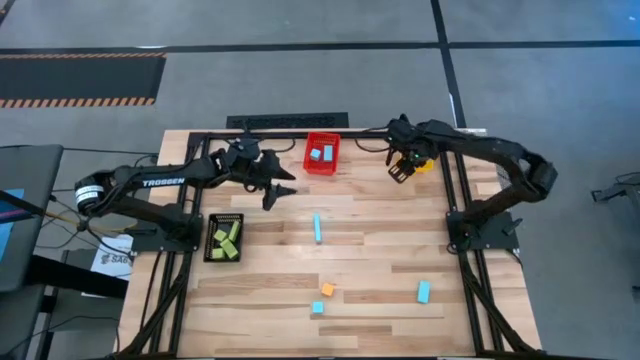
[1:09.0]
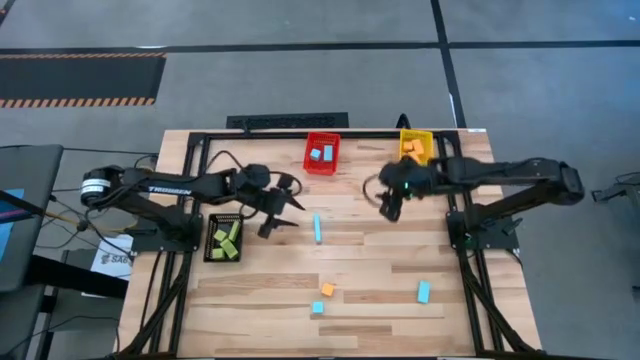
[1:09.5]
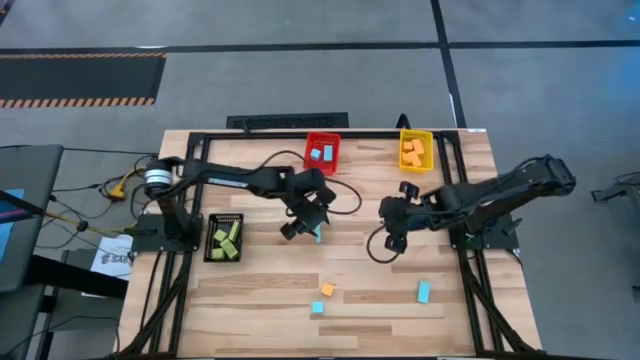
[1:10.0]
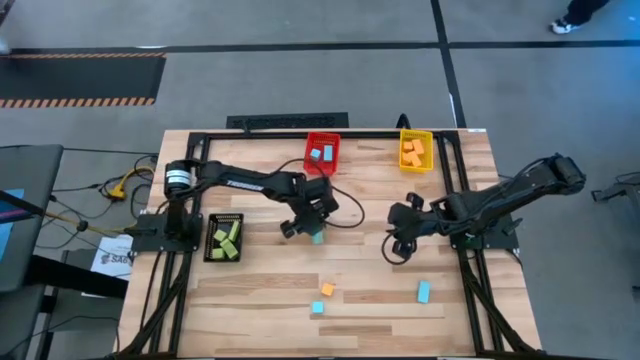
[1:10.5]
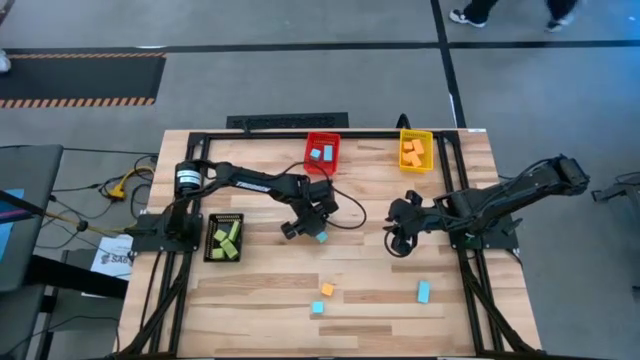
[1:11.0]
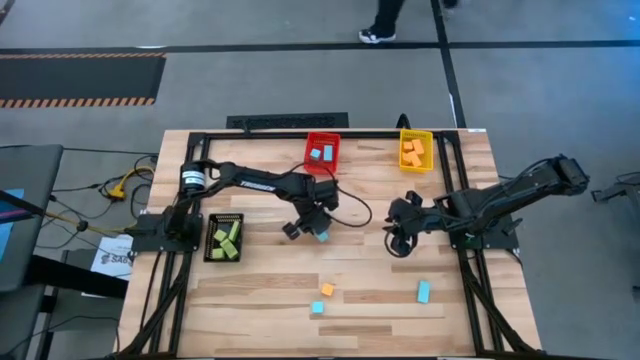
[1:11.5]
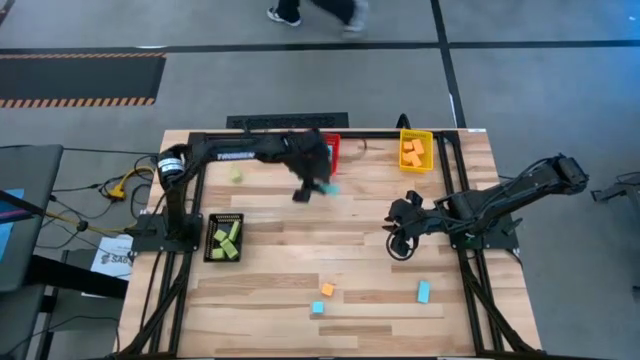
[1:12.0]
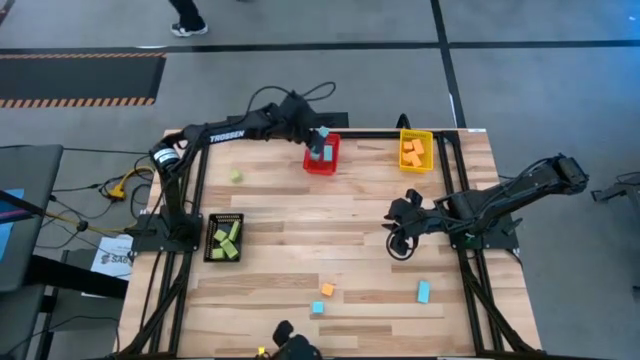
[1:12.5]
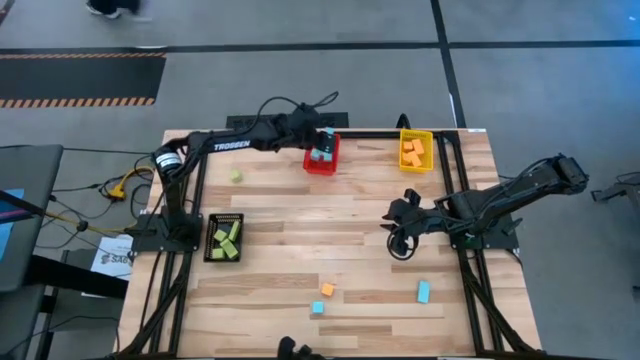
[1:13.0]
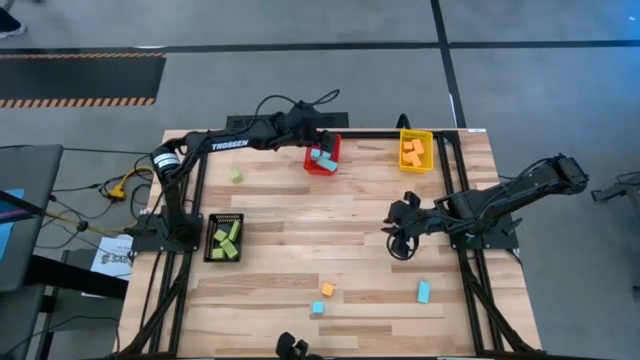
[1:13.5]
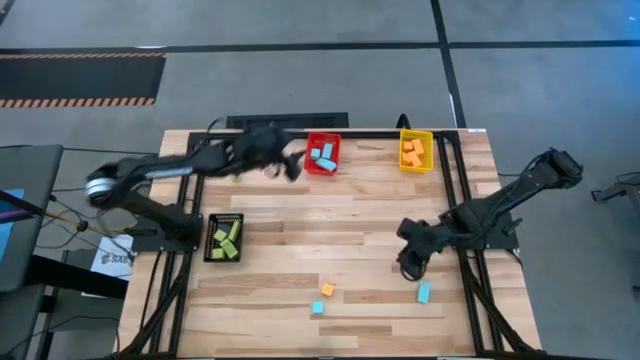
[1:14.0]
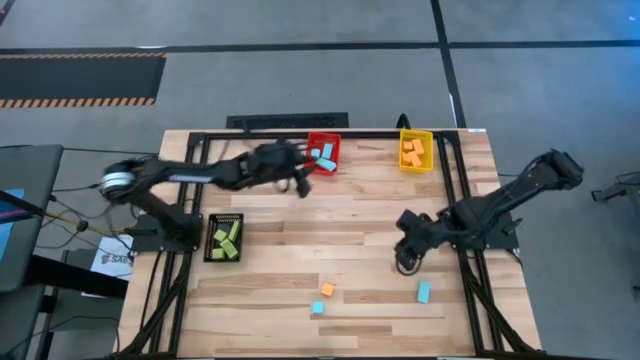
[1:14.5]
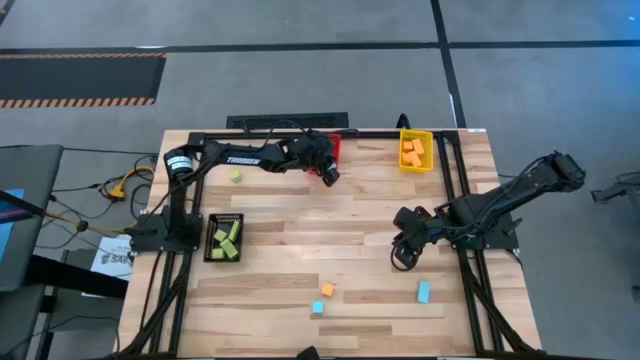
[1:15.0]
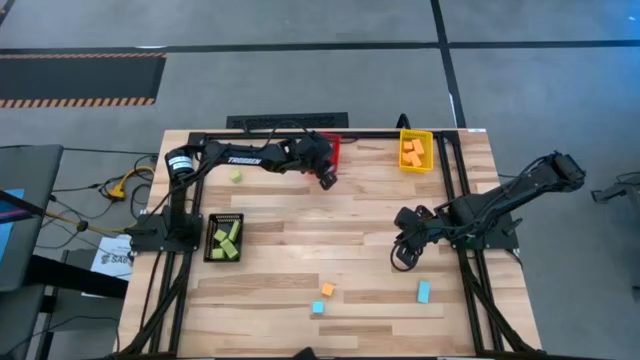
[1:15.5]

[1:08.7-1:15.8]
Task: Sort & place blocks by color
Put the blue block into the red bin

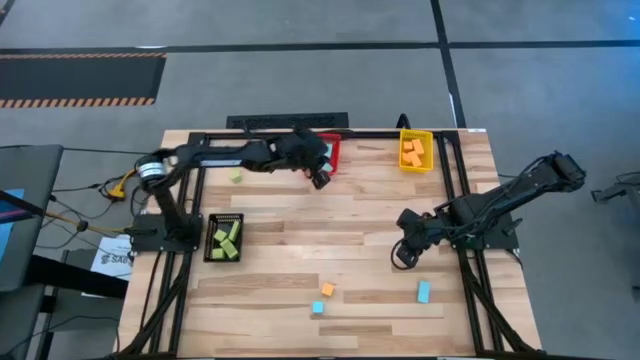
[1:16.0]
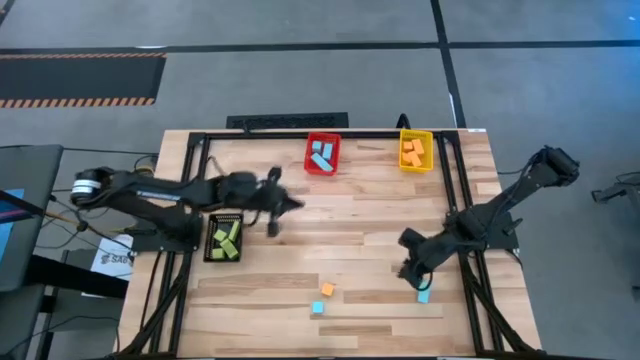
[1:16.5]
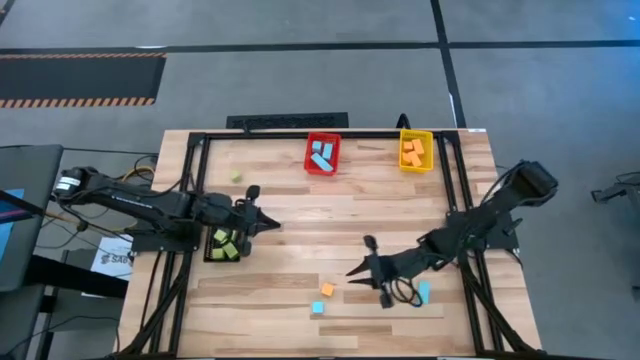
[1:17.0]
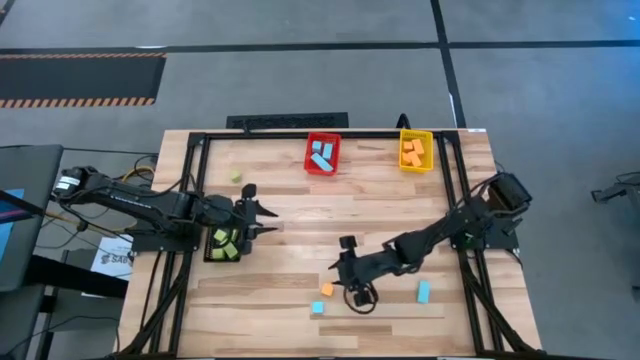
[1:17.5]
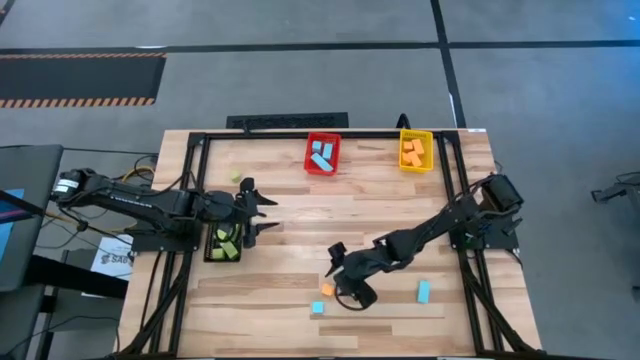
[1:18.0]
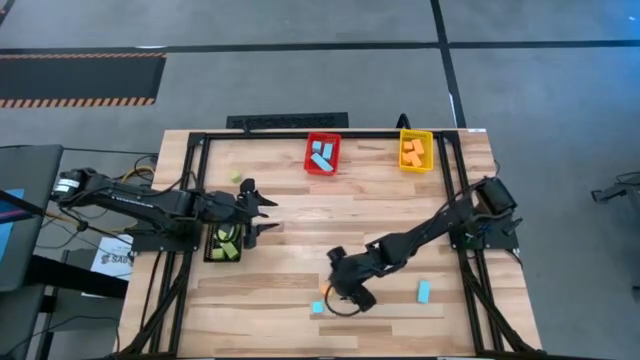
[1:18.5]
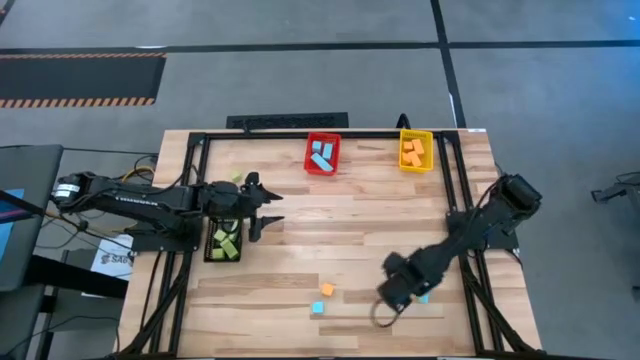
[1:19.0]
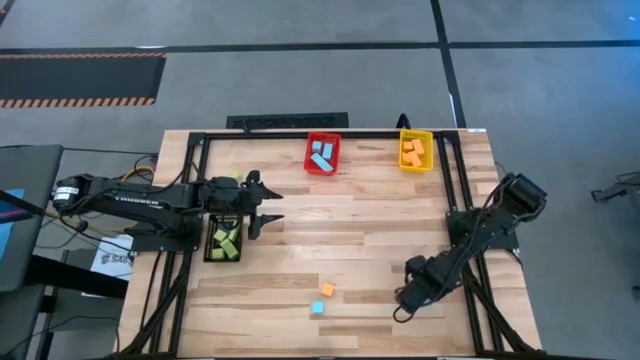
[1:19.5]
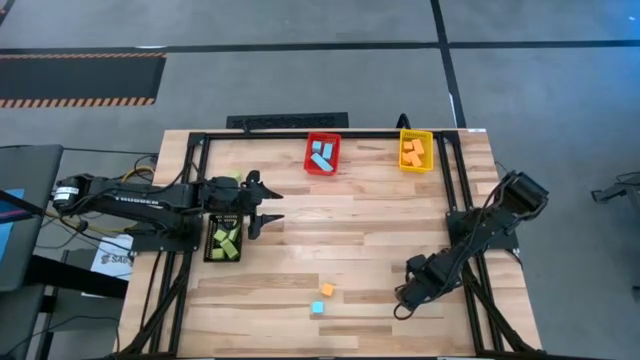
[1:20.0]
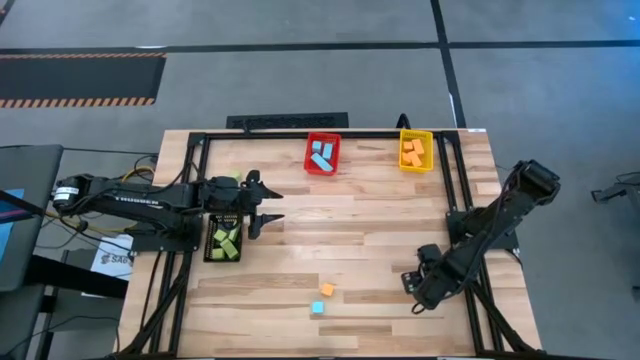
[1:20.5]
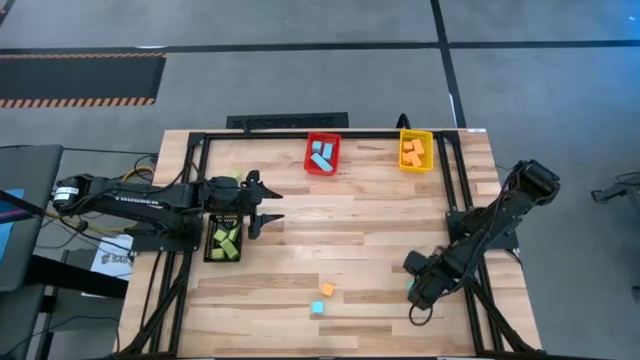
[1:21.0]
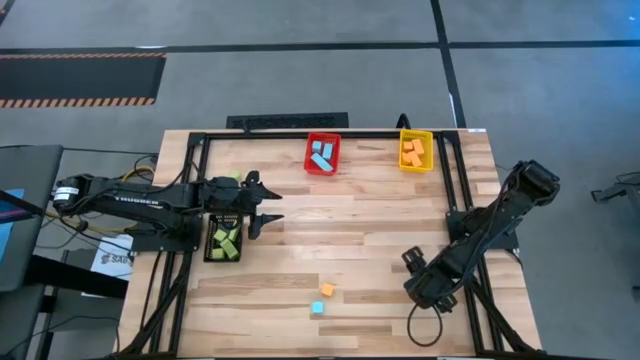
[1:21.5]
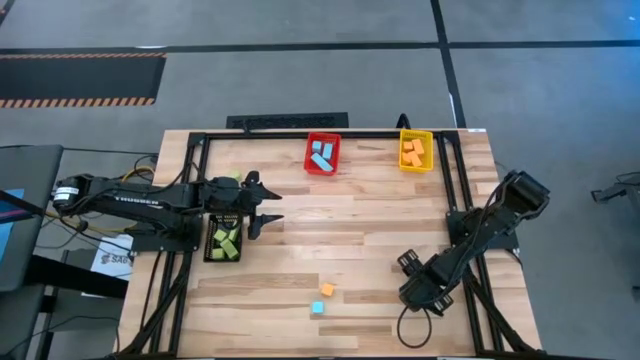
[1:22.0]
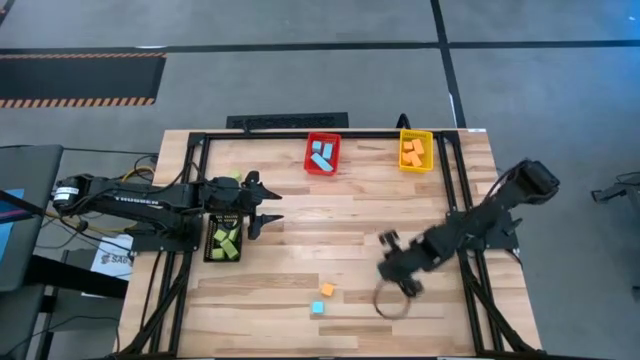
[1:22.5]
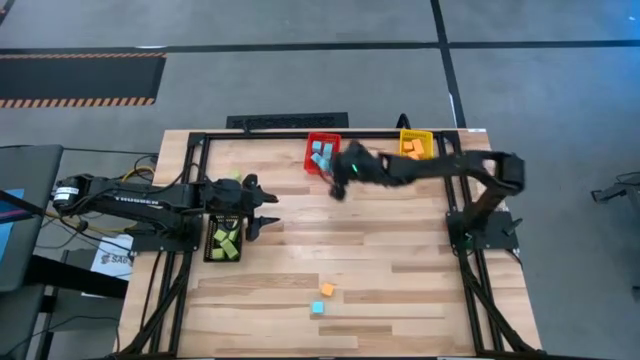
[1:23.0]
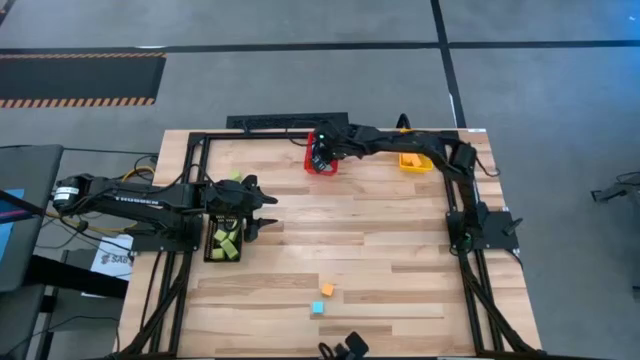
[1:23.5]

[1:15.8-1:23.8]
Put the blue block into the red bin

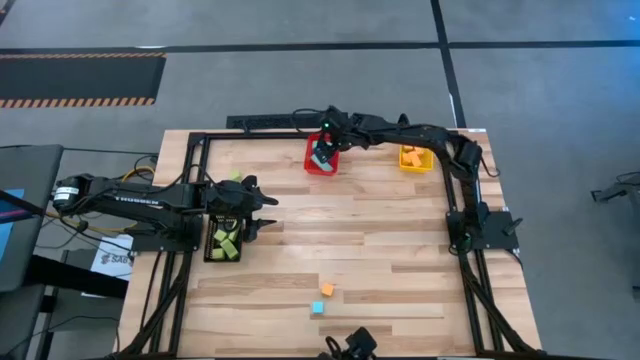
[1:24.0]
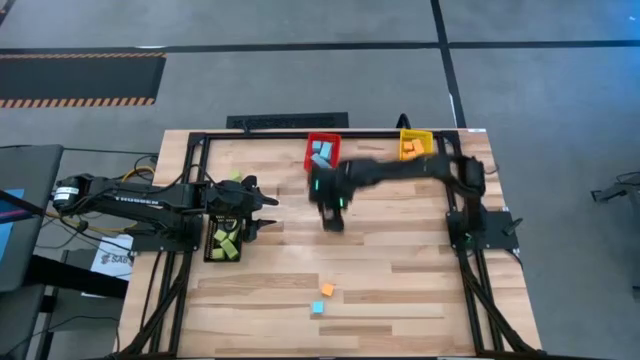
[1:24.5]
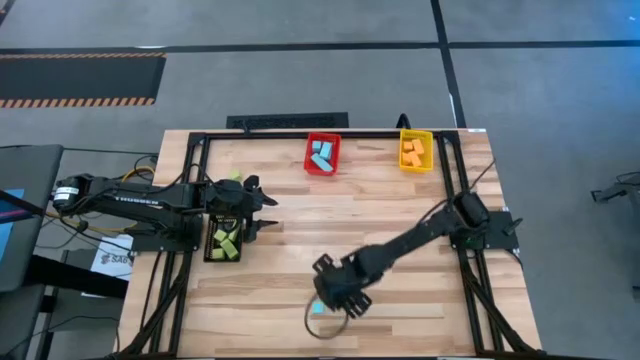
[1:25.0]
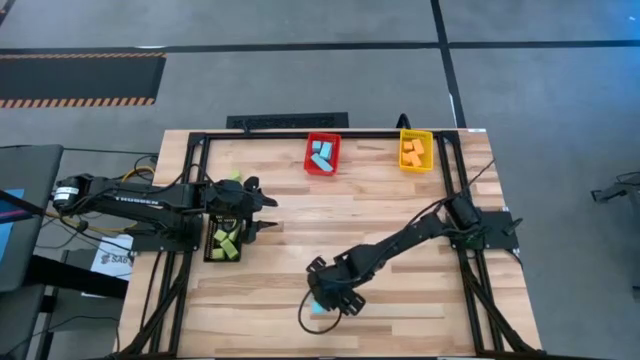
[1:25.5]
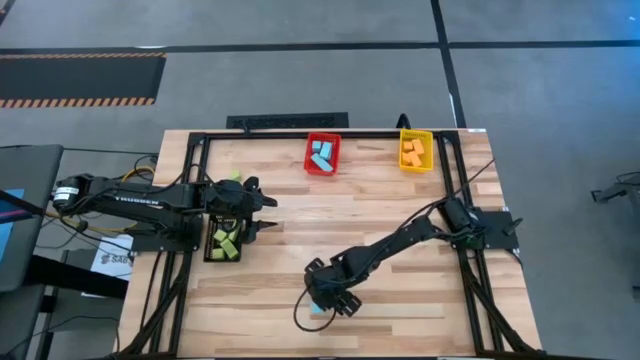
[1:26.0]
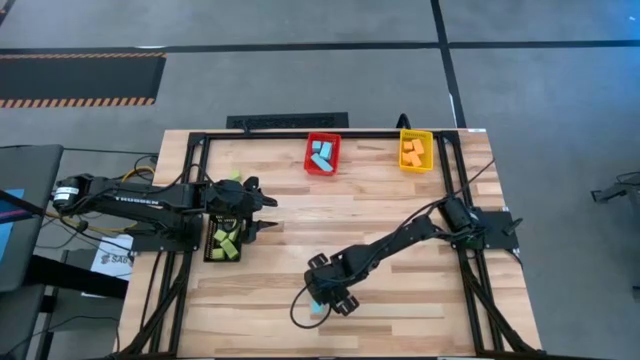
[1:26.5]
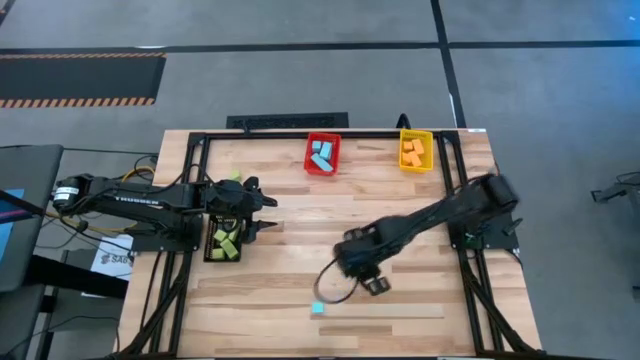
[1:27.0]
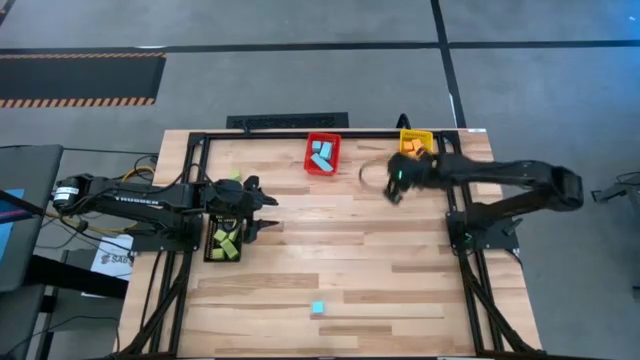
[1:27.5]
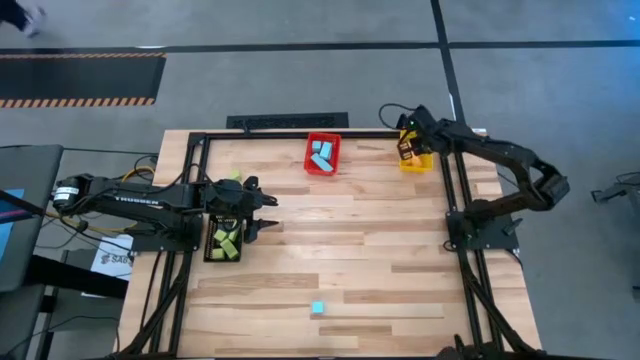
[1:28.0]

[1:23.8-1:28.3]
Put the orange block into the yellow bin

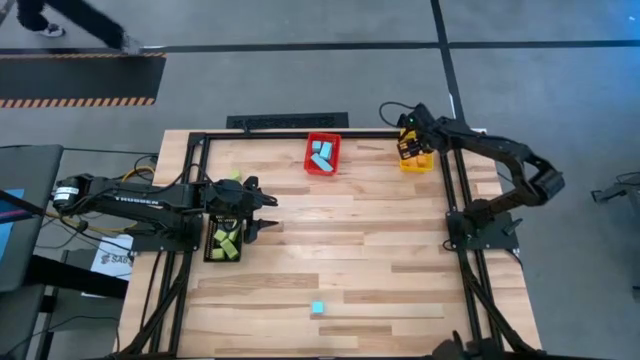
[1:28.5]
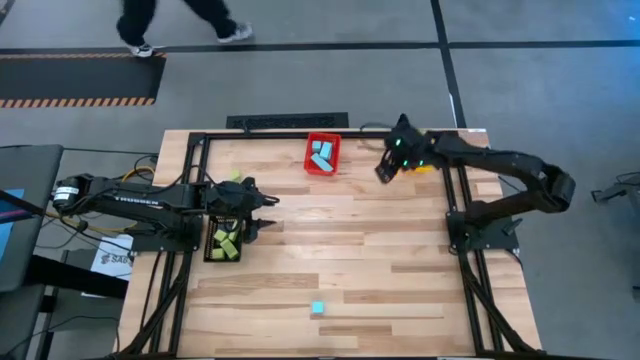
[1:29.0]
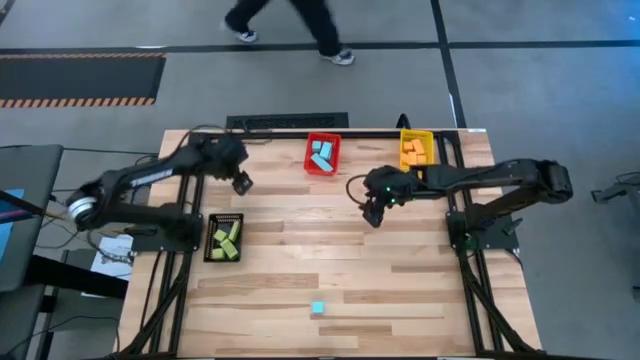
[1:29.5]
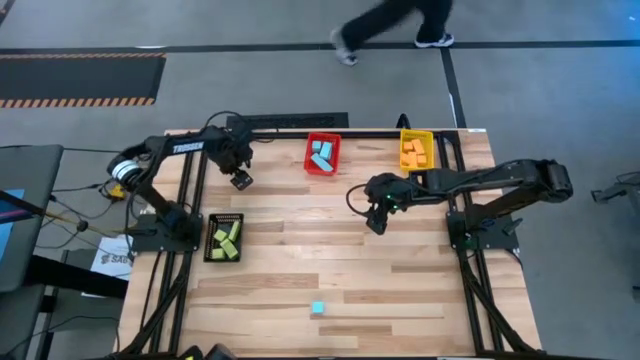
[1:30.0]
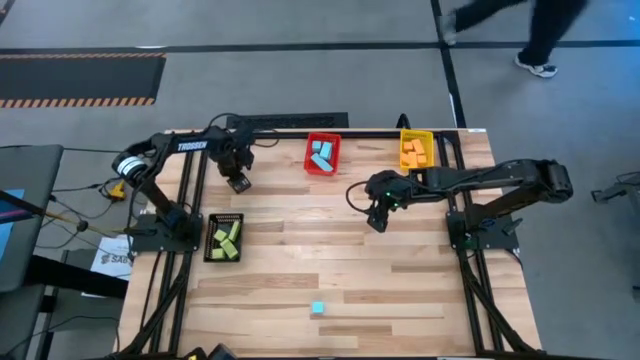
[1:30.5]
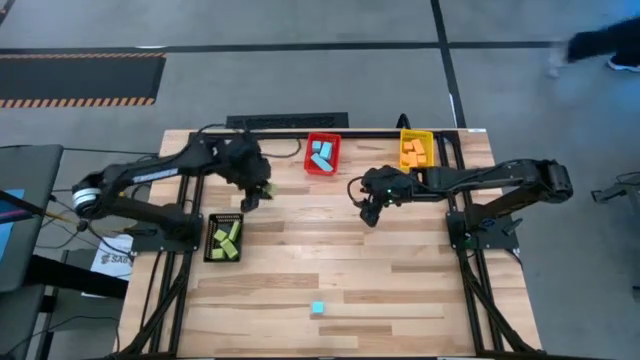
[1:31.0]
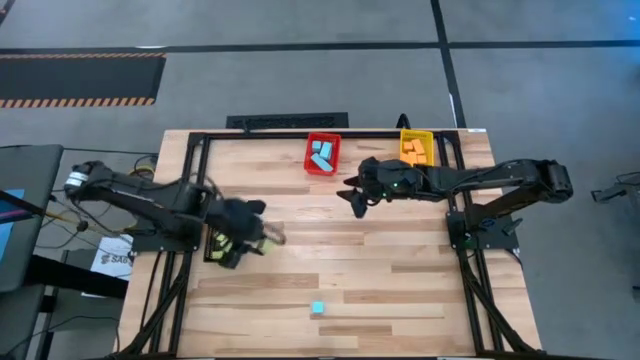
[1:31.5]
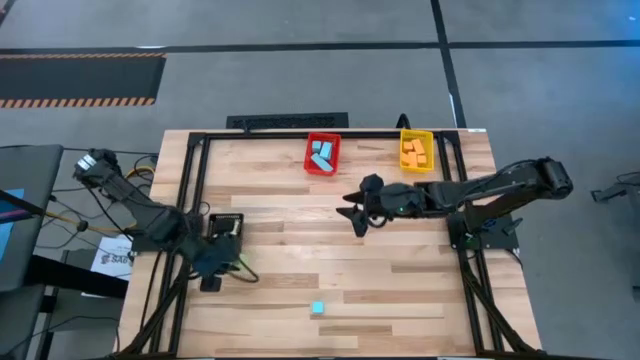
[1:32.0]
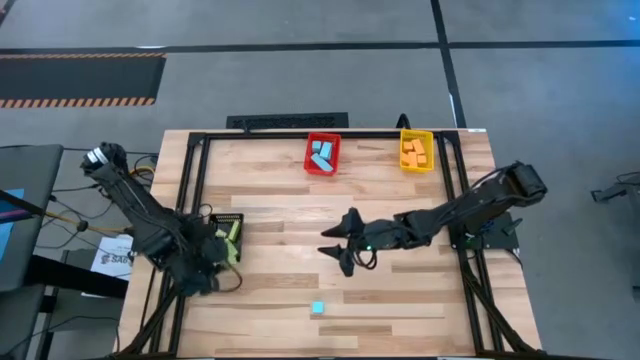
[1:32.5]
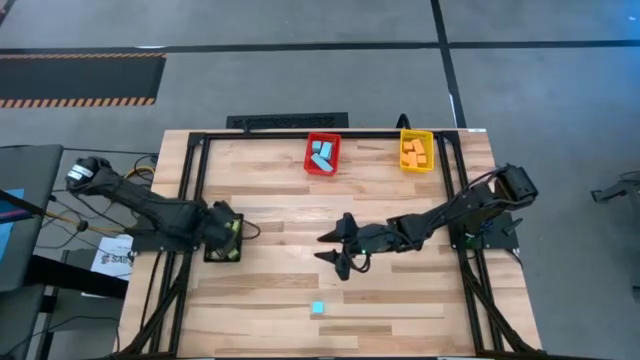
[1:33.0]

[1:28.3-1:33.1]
Put the green block into the black bin
